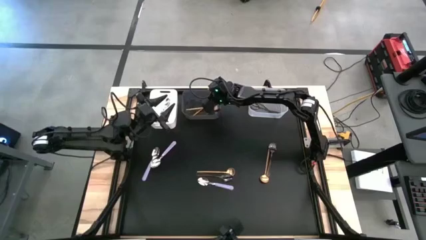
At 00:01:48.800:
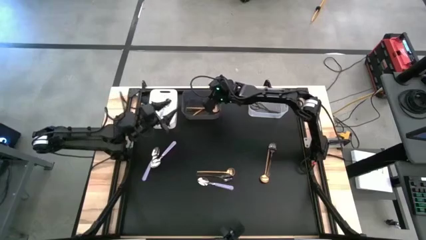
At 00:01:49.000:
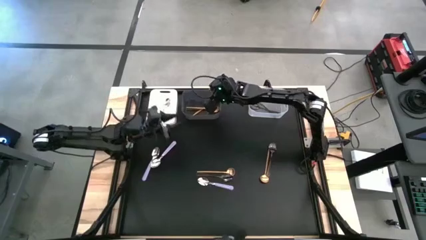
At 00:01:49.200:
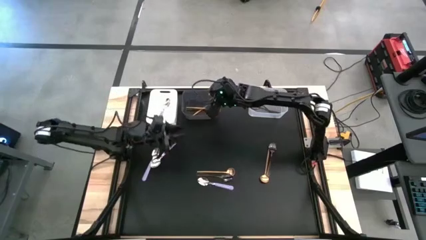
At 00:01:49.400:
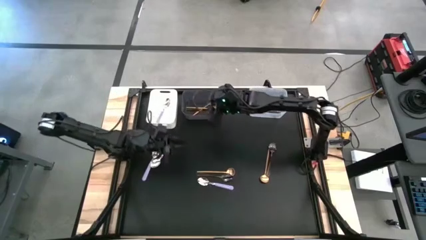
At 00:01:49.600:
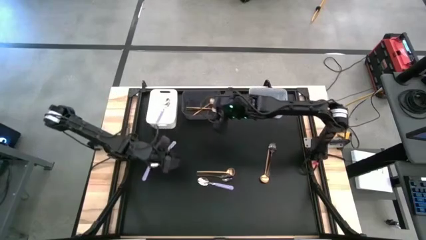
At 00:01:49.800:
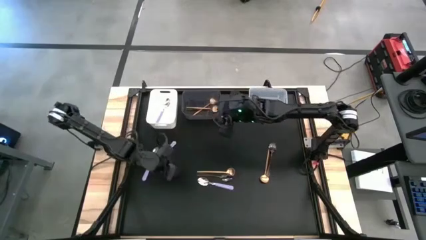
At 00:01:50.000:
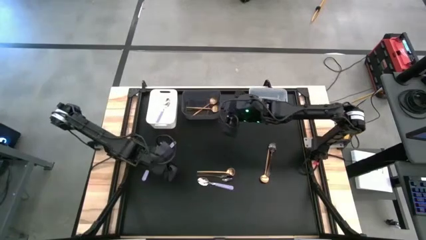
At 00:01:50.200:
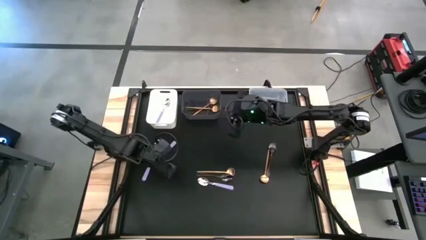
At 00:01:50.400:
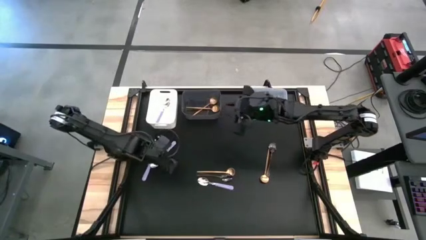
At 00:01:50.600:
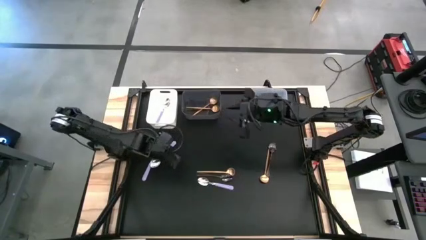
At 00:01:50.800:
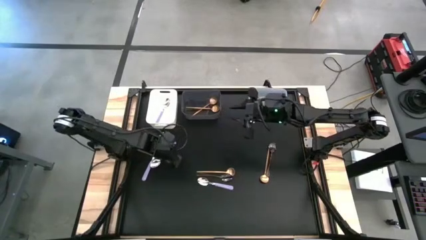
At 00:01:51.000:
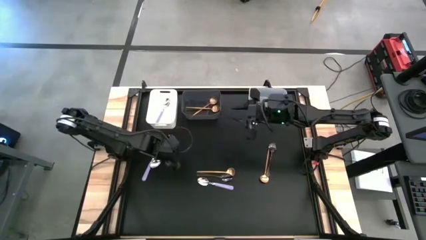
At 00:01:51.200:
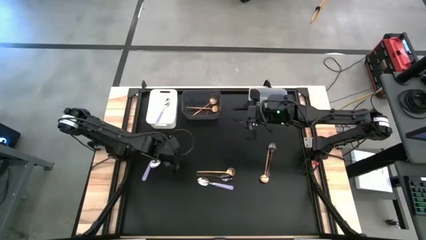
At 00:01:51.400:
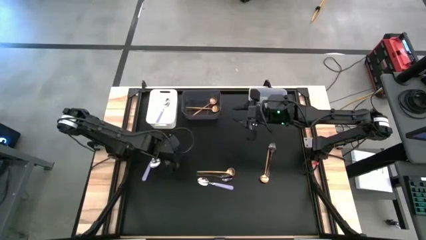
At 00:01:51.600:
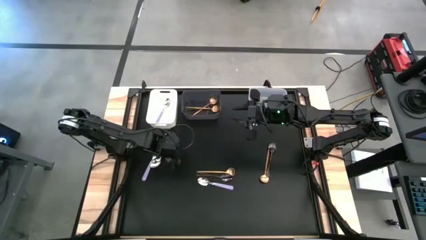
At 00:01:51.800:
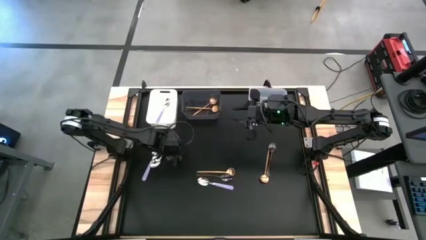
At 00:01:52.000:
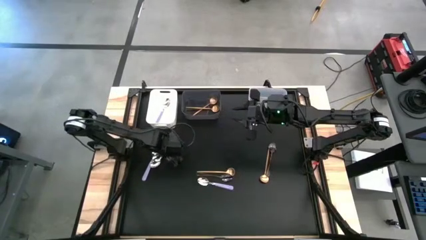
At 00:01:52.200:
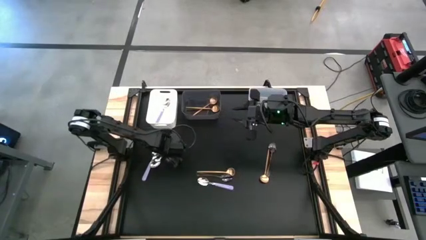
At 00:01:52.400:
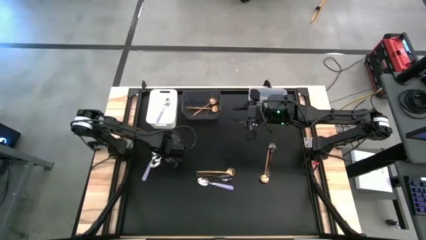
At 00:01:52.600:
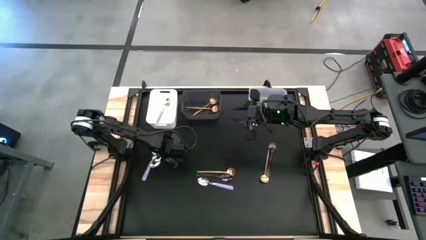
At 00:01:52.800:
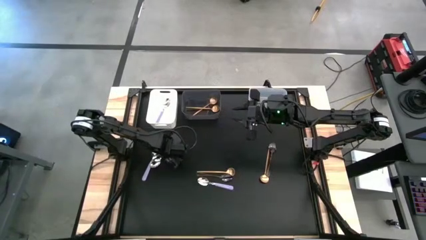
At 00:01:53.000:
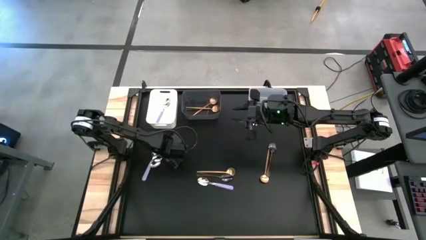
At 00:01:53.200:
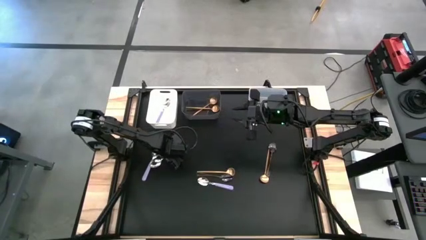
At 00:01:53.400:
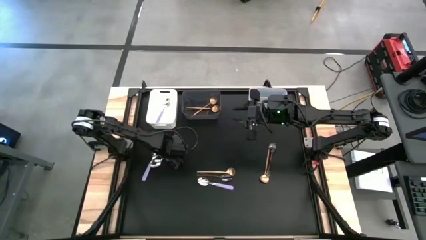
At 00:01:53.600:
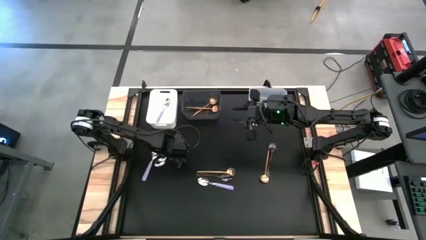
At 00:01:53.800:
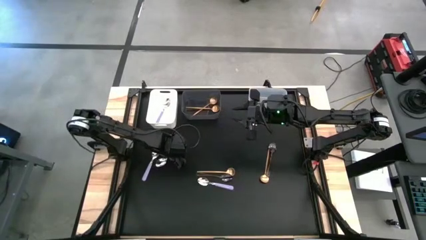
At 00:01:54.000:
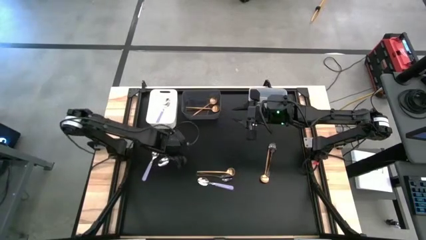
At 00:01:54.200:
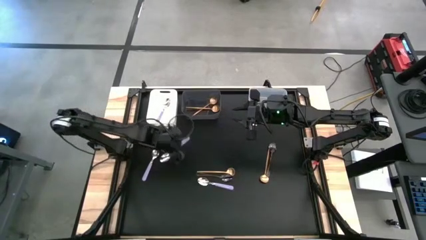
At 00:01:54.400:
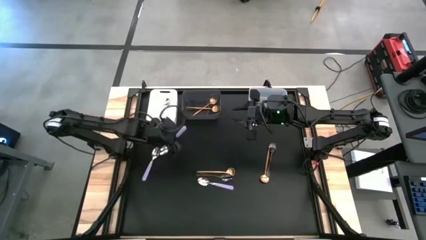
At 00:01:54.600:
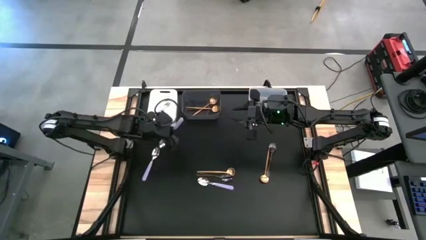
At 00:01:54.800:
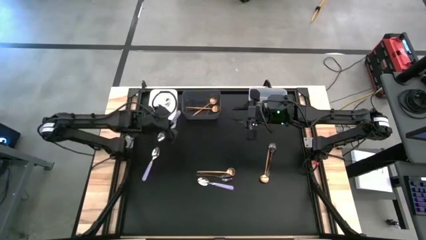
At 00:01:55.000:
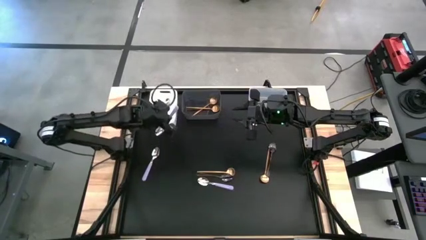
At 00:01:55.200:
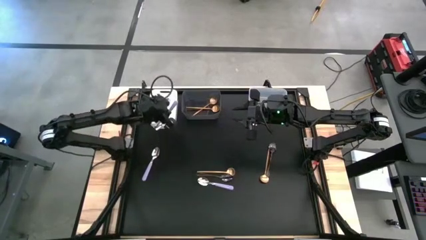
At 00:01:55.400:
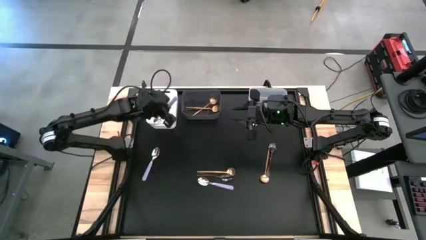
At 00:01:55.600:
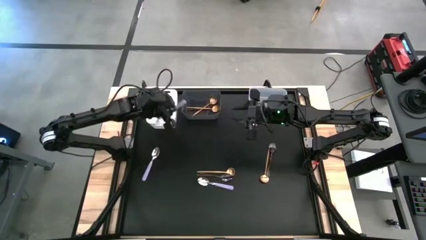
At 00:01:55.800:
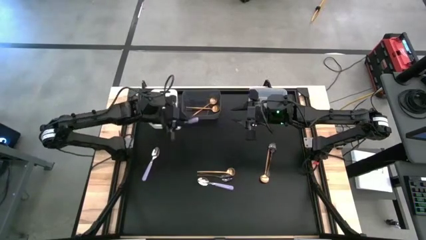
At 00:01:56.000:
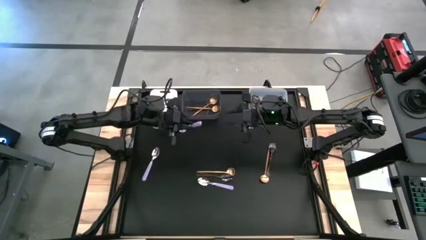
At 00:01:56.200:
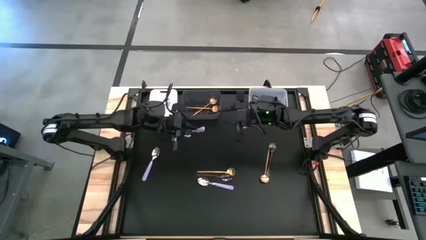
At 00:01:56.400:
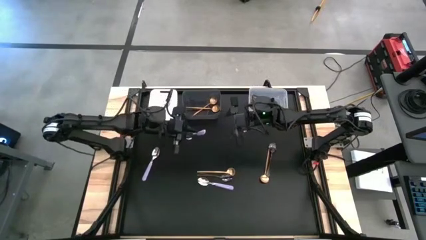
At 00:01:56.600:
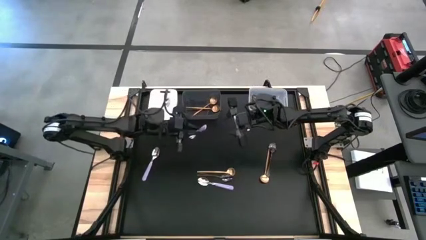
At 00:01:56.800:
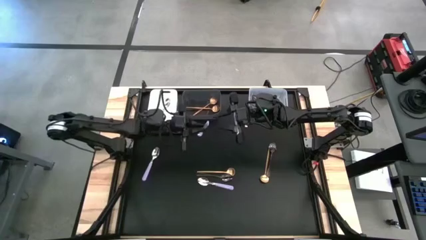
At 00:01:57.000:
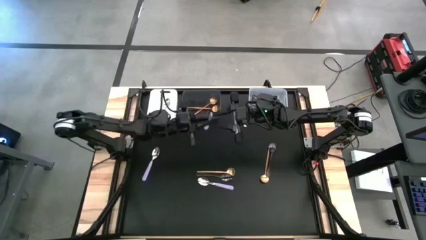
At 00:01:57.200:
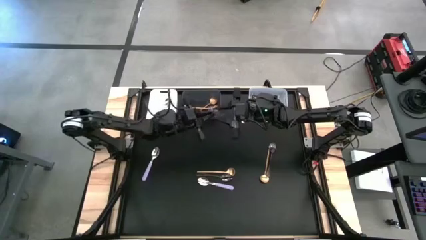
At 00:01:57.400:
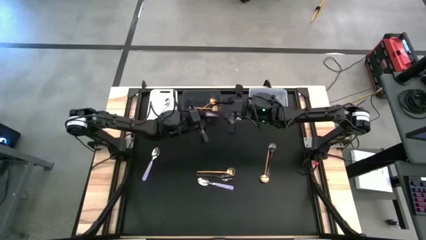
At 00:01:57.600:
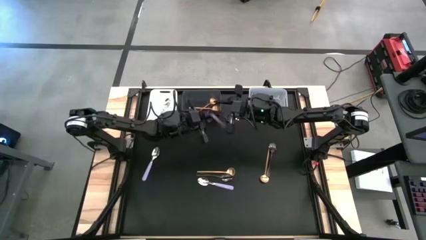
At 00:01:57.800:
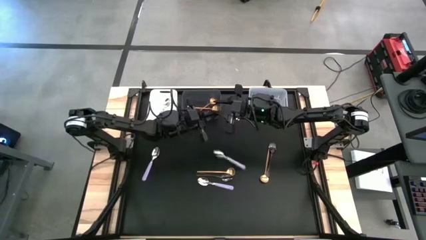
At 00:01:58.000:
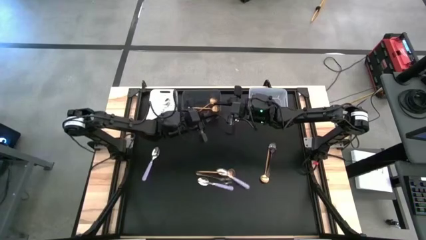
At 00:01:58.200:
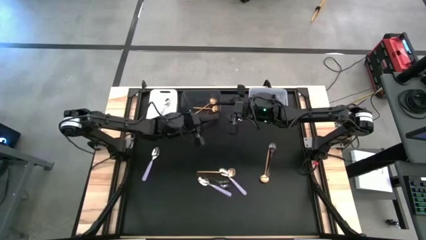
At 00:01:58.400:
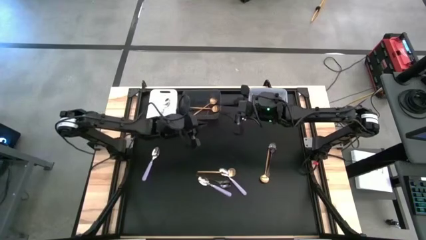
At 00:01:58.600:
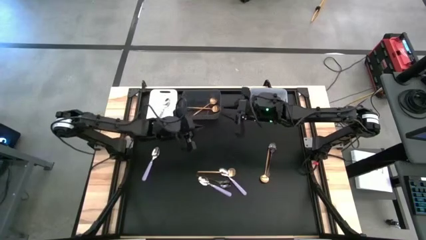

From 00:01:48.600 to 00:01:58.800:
Task: Sort silverware by color (type)
Put the purple spoon into the white bin
